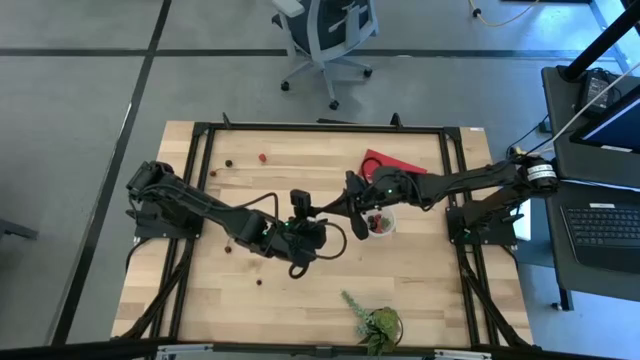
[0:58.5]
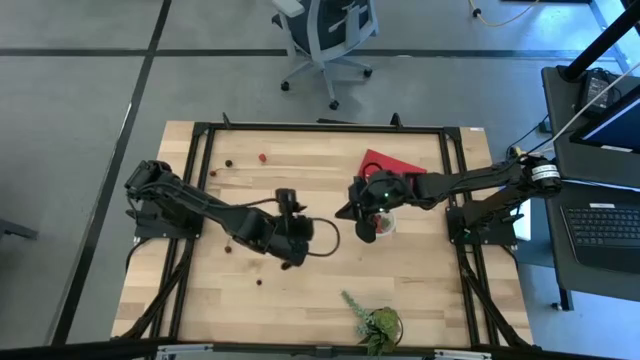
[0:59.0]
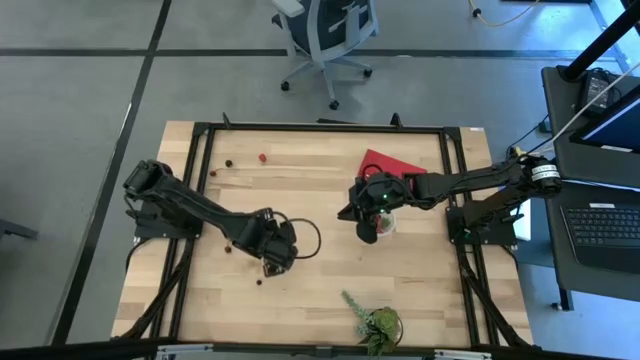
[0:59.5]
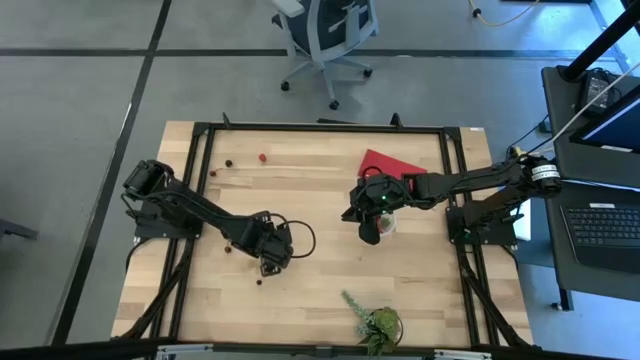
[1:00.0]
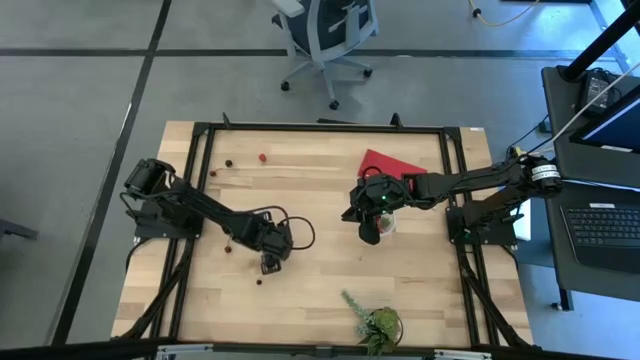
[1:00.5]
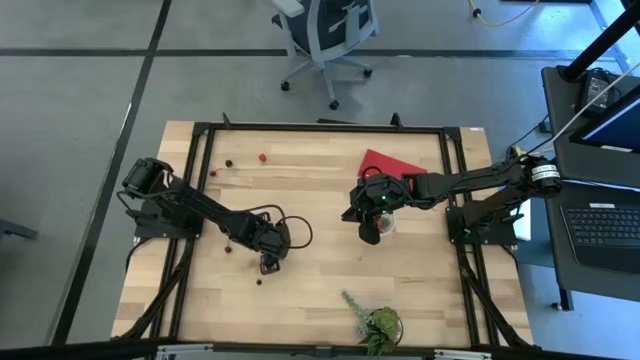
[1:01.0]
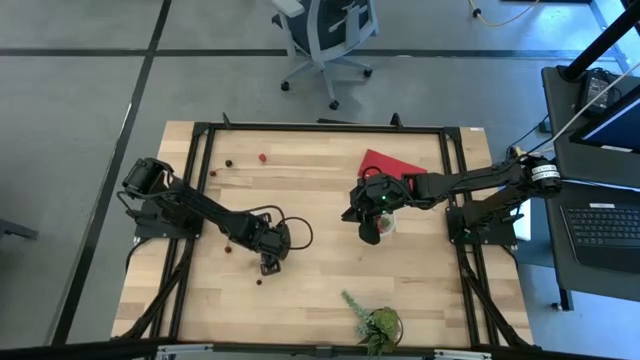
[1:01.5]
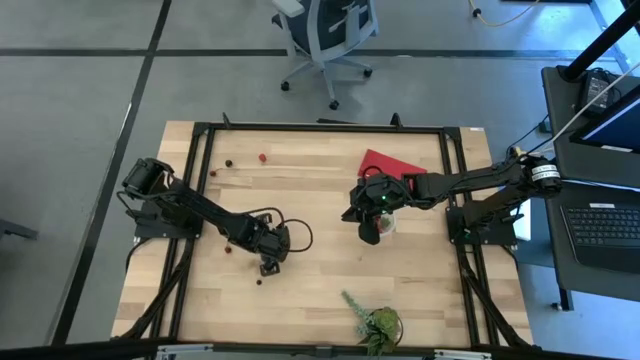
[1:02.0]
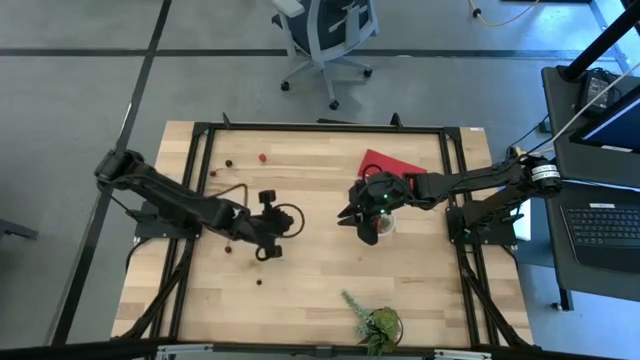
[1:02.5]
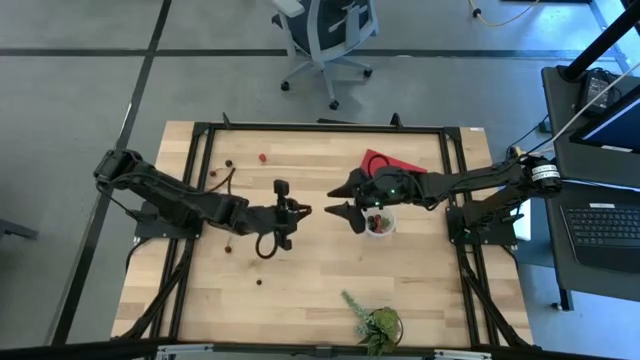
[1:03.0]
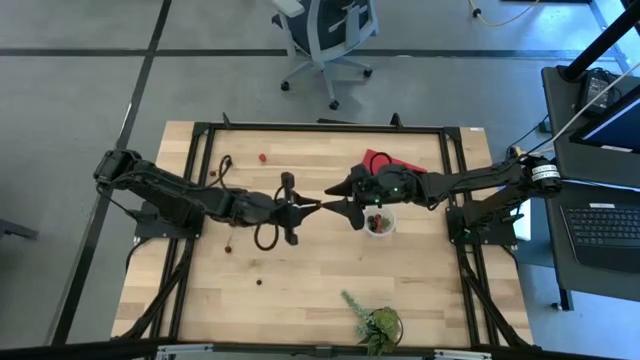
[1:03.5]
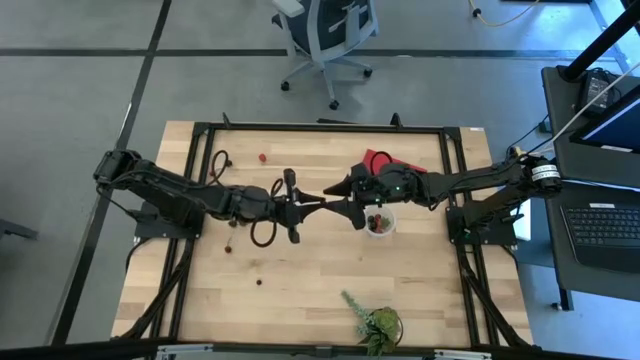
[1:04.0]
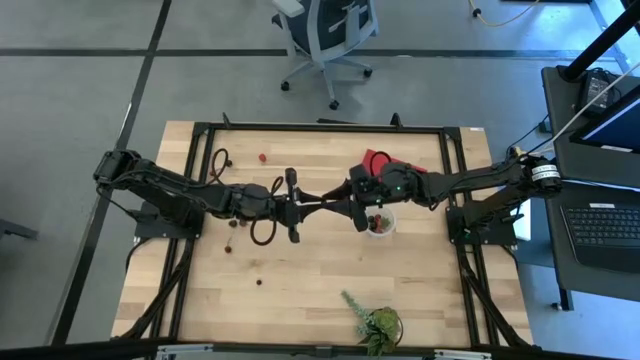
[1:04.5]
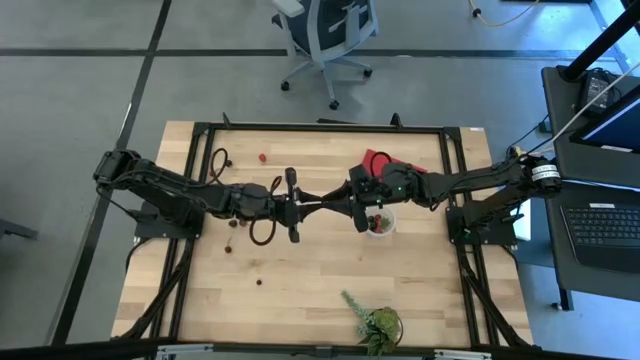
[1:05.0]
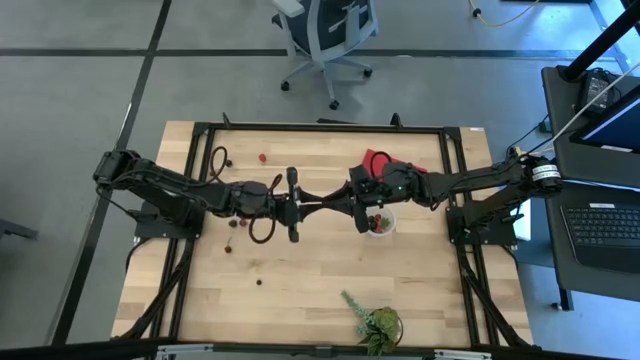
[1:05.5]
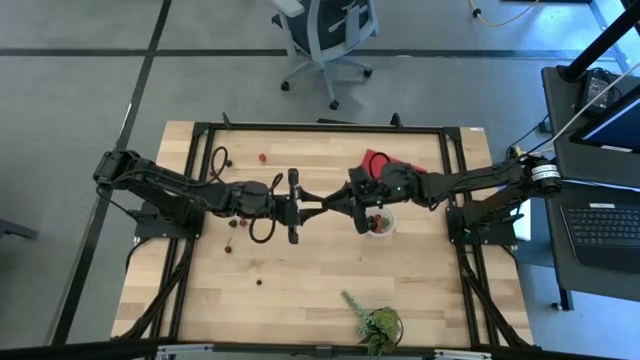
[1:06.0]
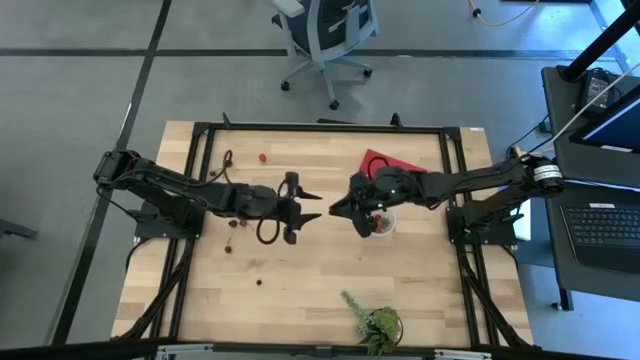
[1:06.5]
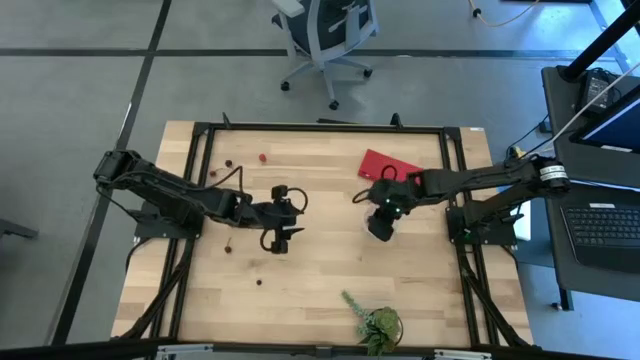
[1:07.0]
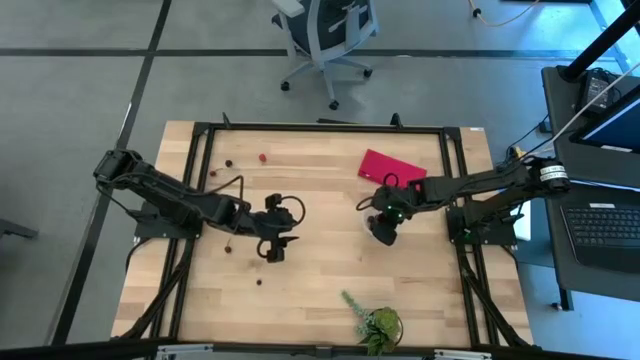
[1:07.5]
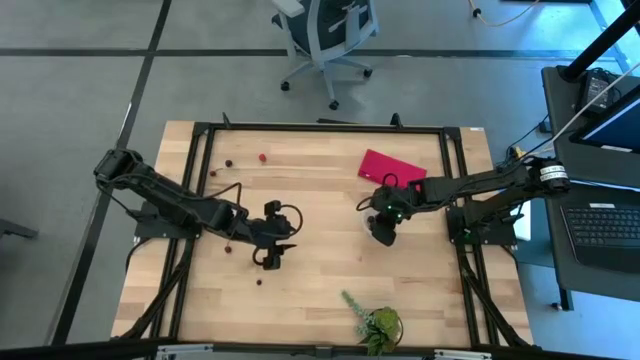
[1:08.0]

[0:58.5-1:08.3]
Task: Pick and placing Produce into tupperware
Put the bottom blueberry into the transparent container

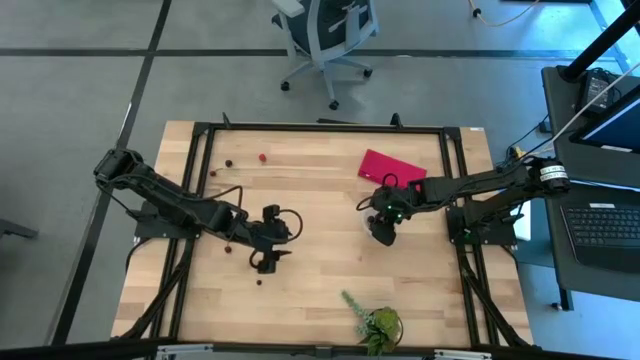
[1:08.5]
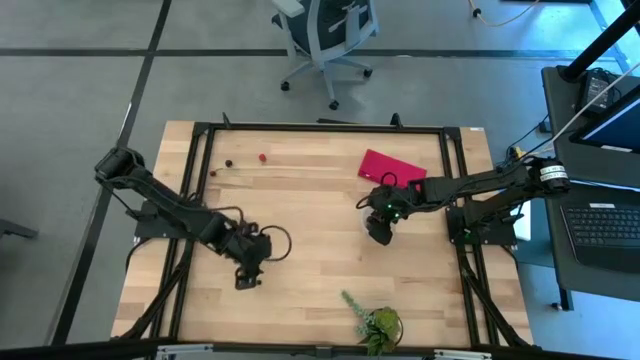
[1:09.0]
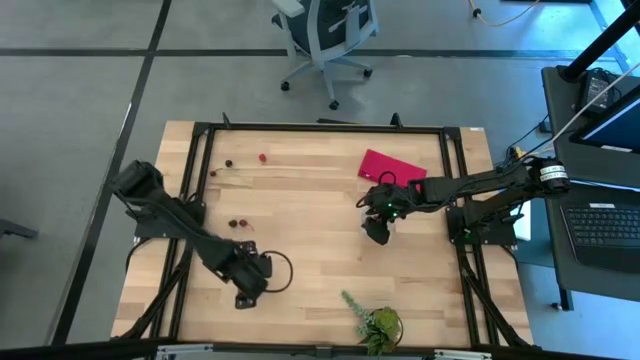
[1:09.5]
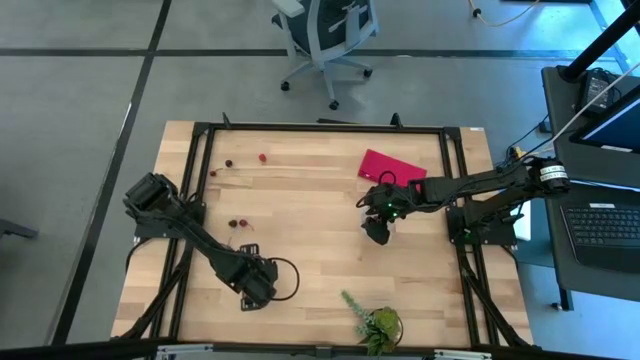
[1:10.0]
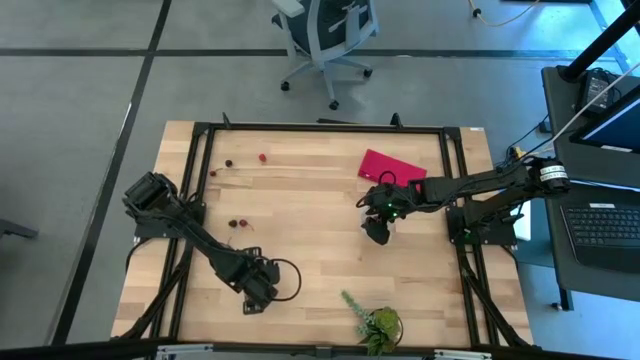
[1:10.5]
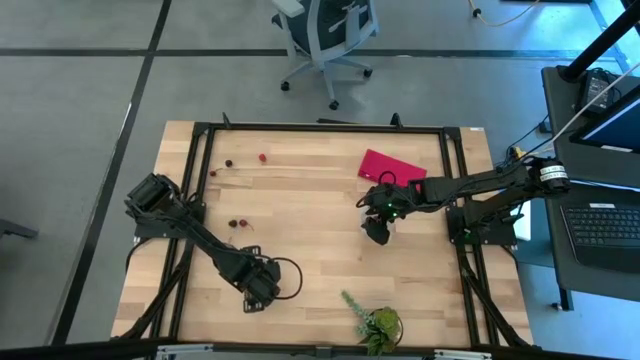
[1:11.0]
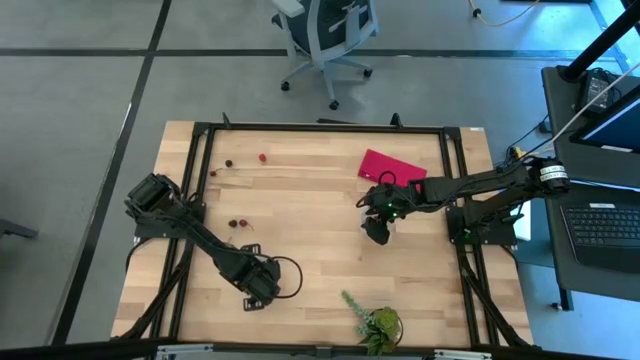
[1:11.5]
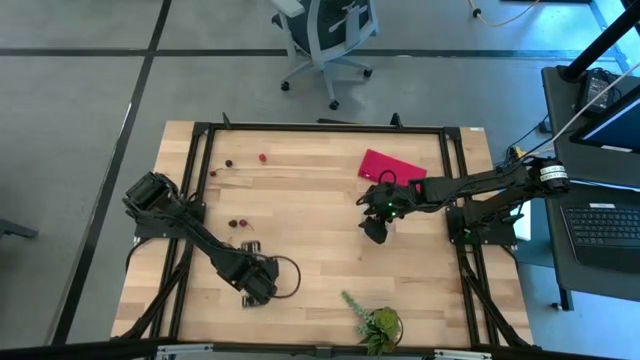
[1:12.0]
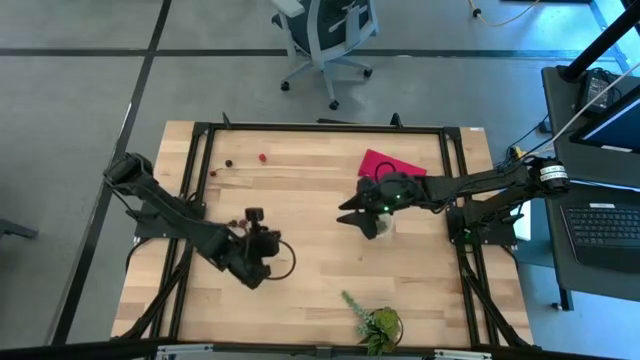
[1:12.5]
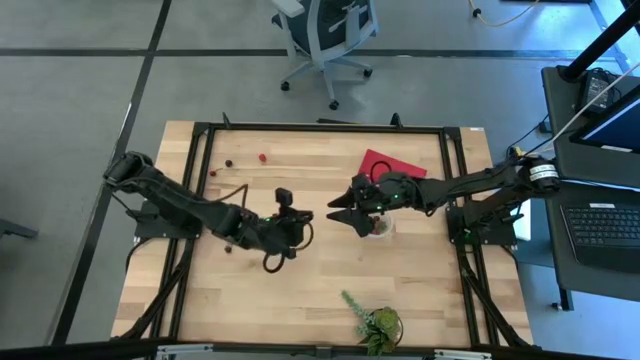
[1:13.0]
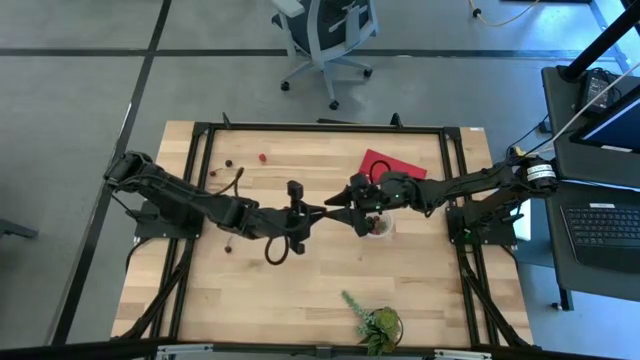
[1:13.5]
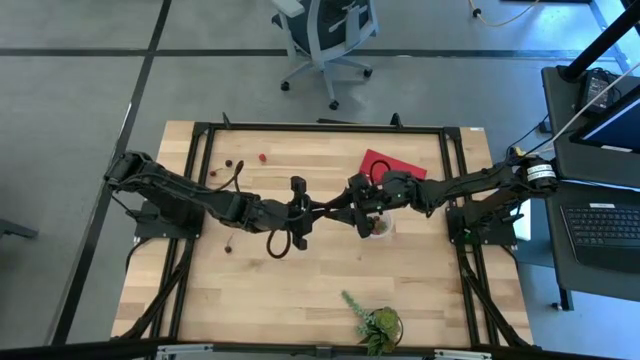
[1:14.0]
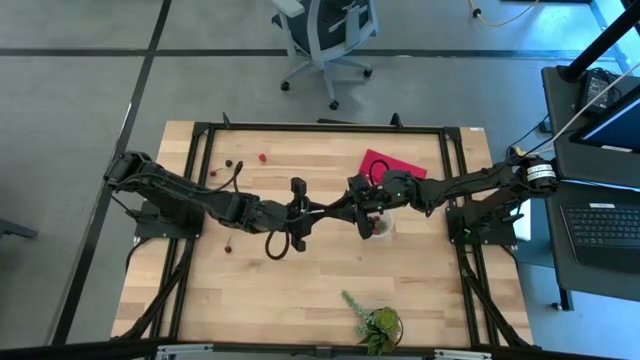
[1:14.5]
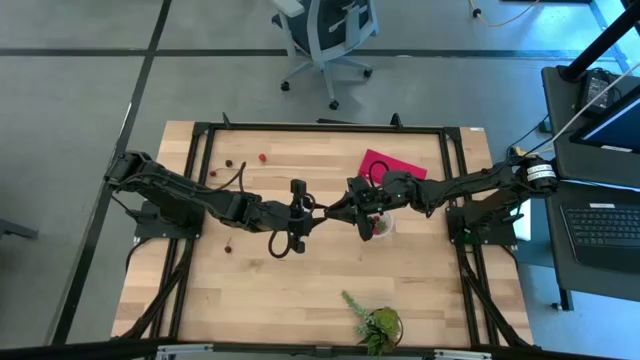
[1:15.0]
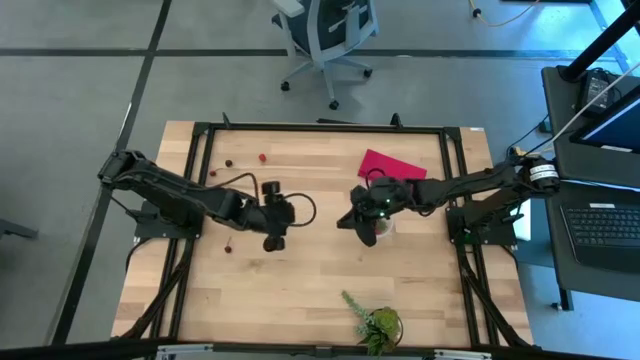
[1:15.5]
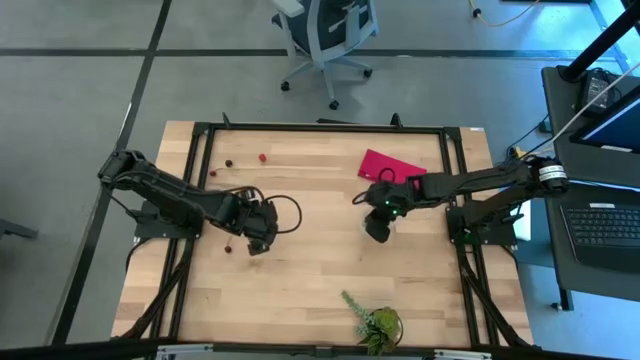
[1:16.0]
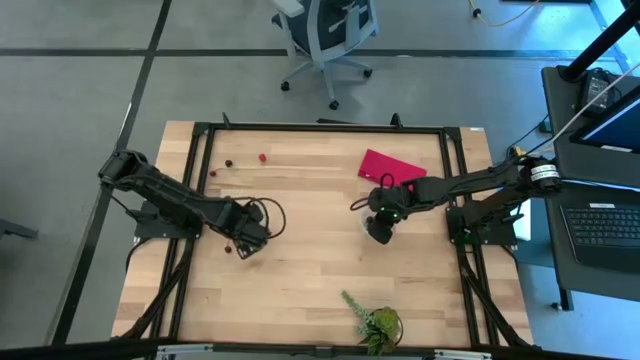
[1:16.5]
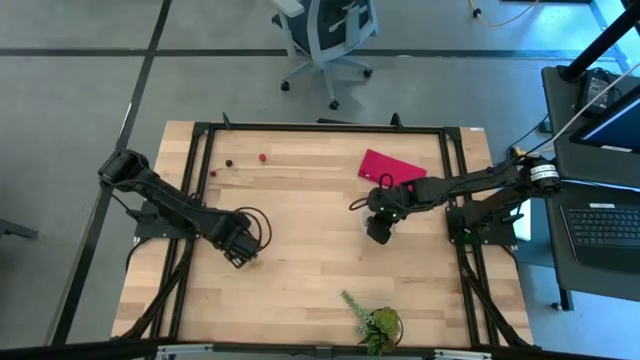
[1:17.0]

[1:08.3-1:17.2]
Put the blueberry into the transparent container

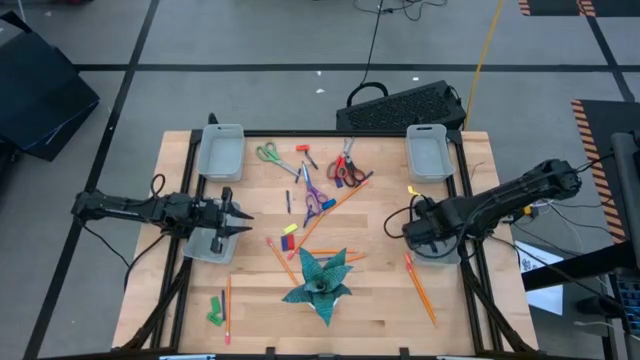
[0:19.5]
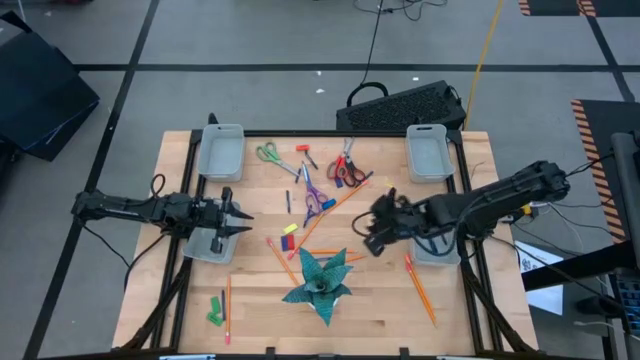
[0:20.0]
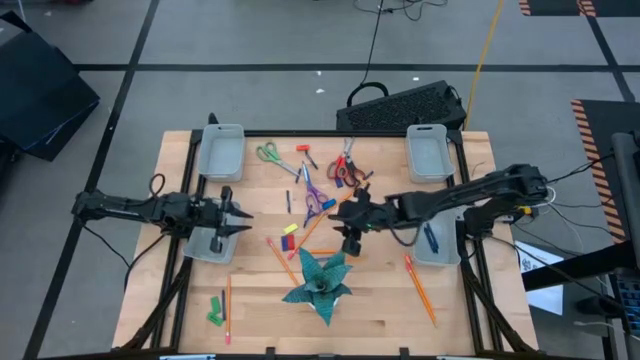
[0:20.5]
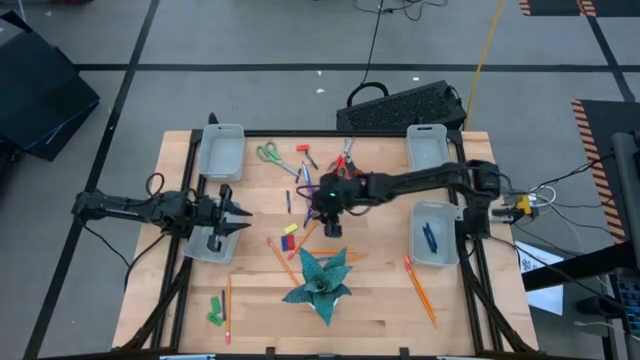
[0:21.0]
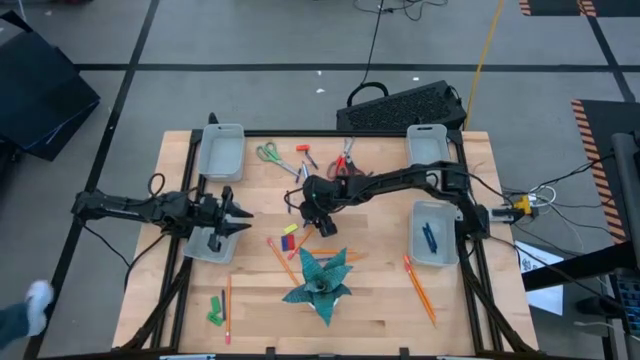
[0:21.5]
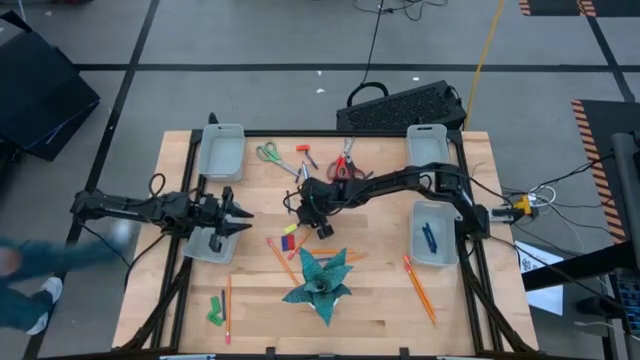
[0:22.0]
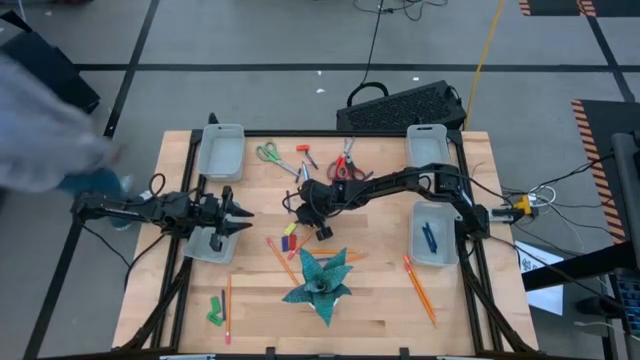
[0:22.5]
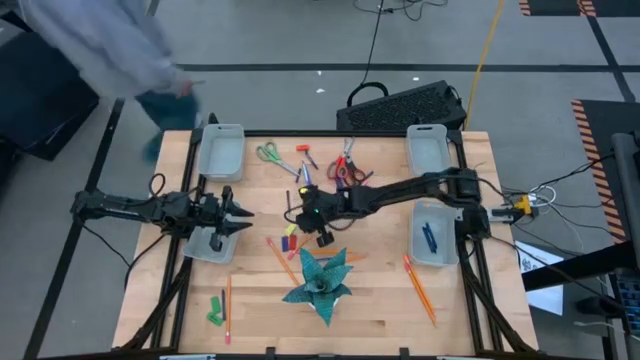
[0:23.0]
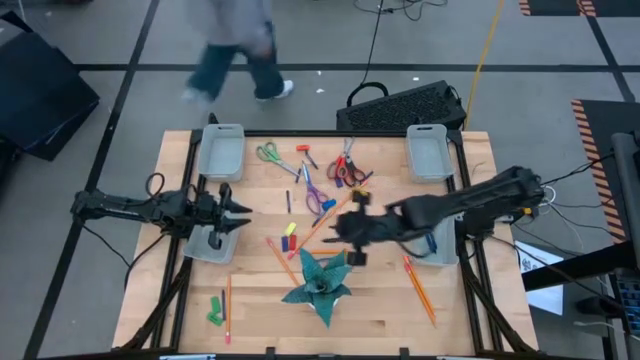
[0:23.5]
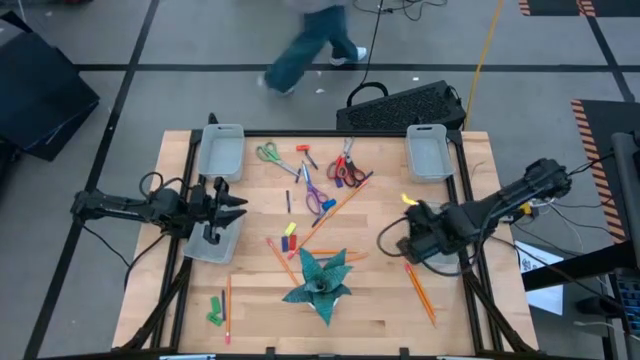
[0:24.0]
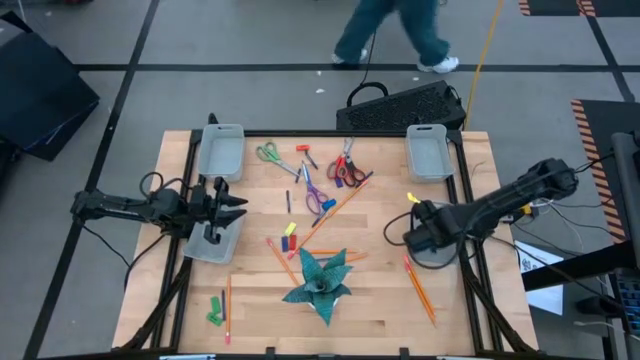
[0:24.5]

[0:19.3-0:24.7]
Task: Sort crayons/erasers/pens/pencils in bins
Put the blue crayon into the bottom right gray bin
